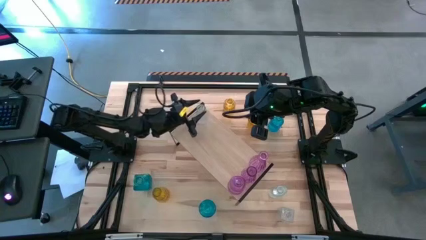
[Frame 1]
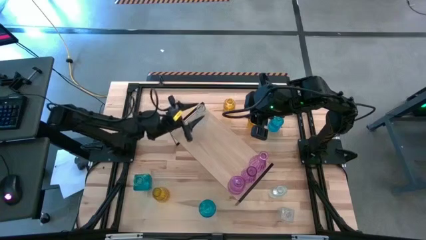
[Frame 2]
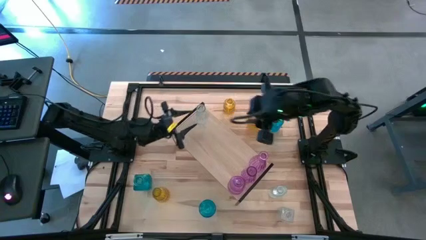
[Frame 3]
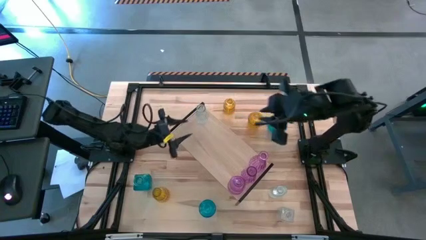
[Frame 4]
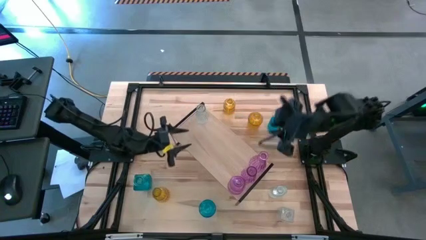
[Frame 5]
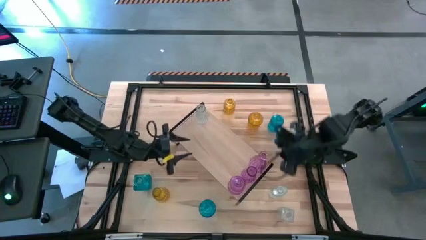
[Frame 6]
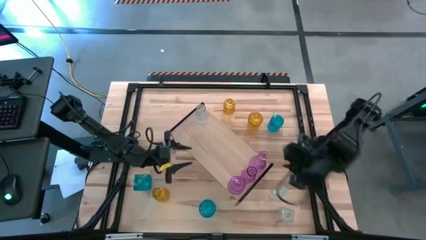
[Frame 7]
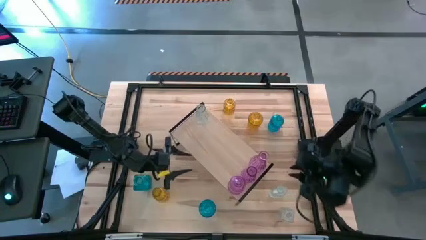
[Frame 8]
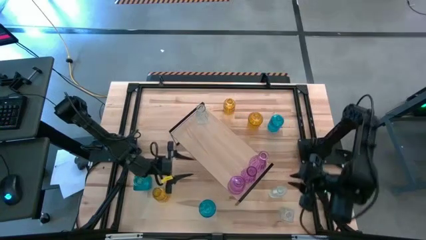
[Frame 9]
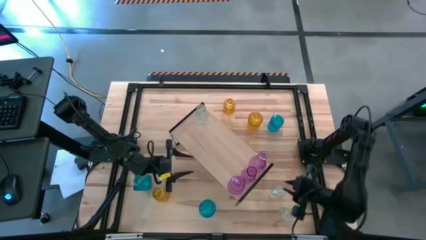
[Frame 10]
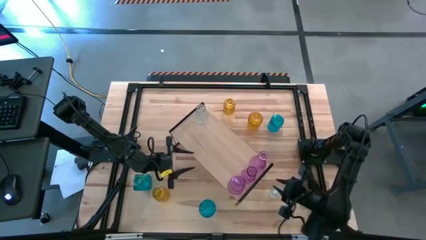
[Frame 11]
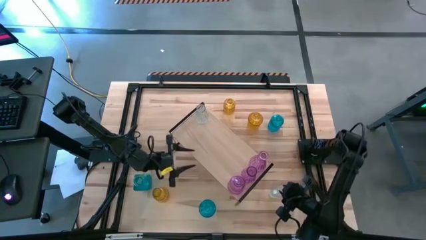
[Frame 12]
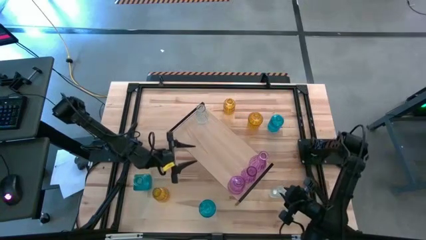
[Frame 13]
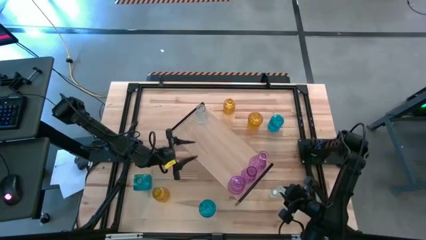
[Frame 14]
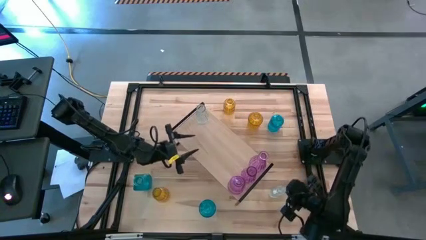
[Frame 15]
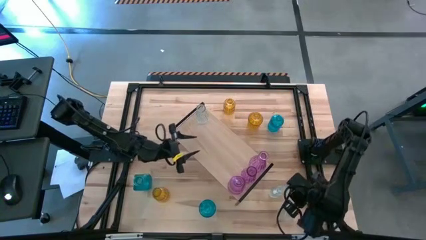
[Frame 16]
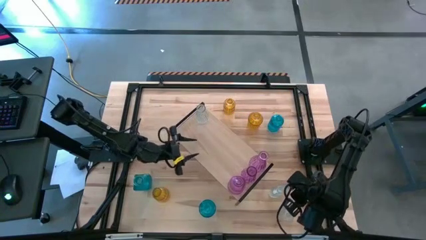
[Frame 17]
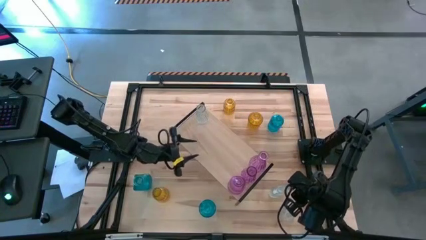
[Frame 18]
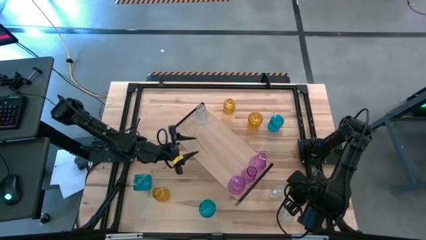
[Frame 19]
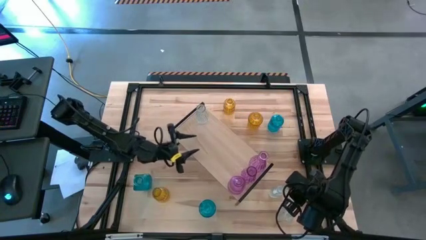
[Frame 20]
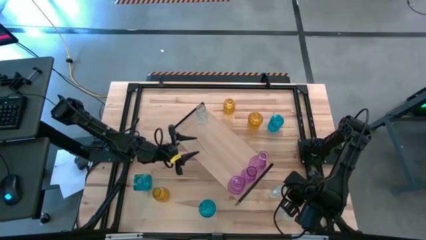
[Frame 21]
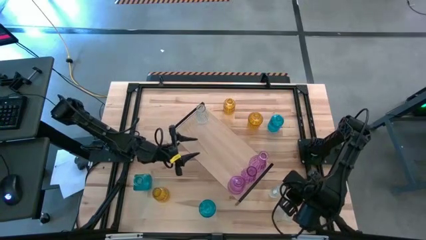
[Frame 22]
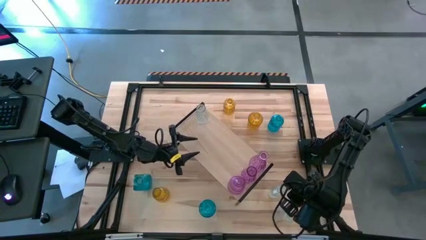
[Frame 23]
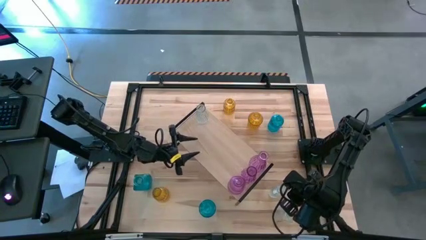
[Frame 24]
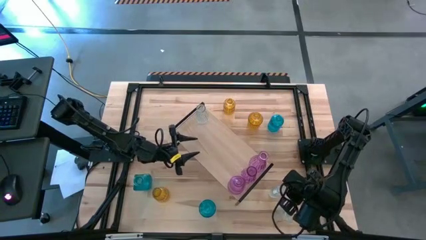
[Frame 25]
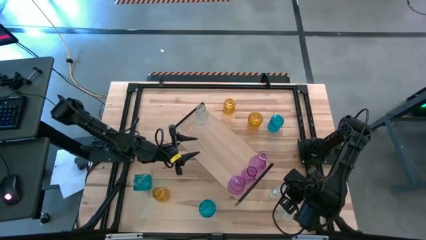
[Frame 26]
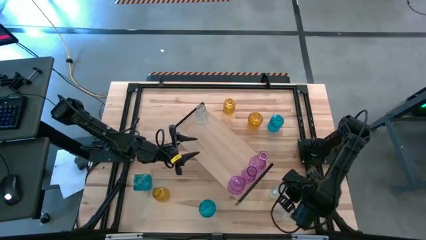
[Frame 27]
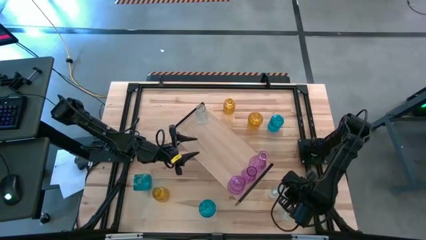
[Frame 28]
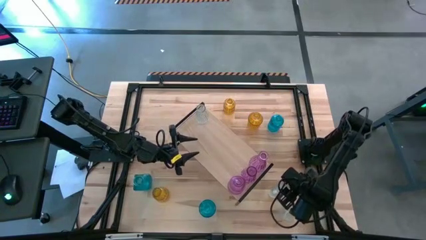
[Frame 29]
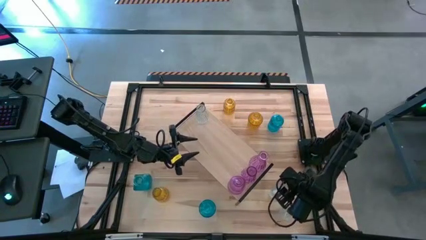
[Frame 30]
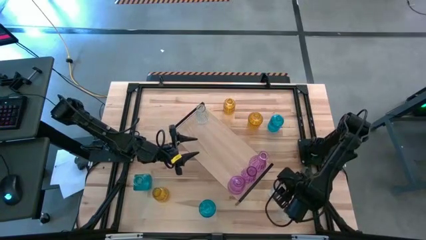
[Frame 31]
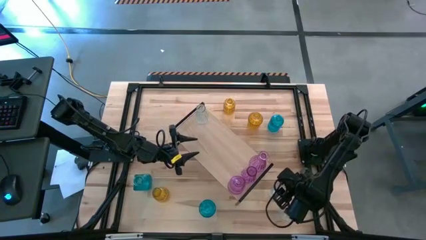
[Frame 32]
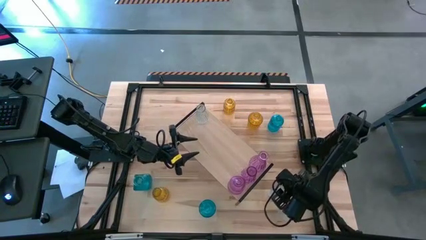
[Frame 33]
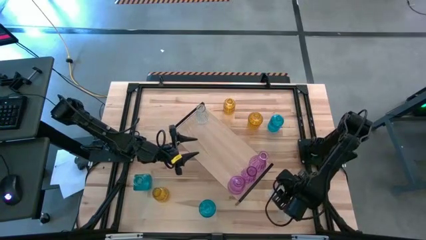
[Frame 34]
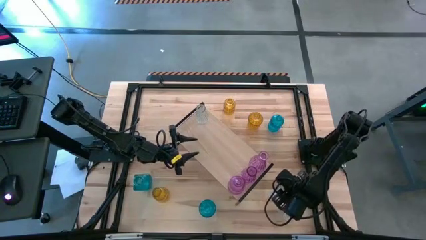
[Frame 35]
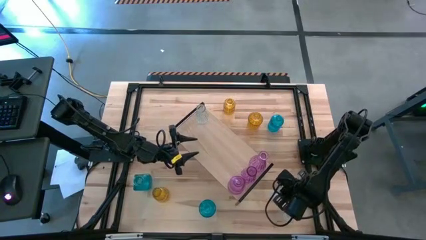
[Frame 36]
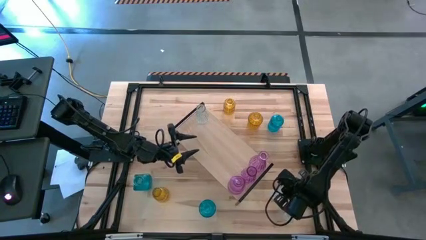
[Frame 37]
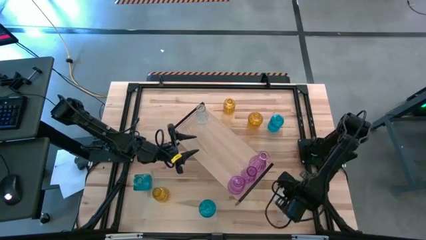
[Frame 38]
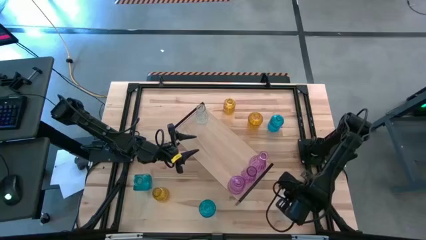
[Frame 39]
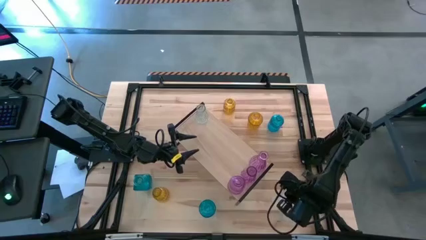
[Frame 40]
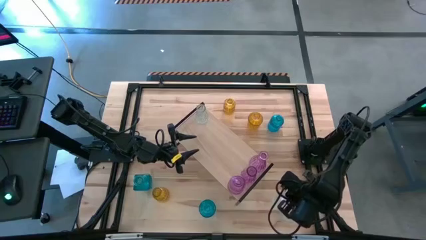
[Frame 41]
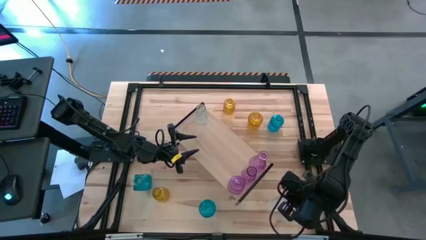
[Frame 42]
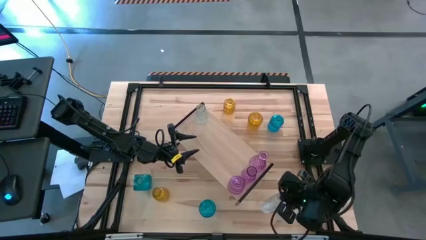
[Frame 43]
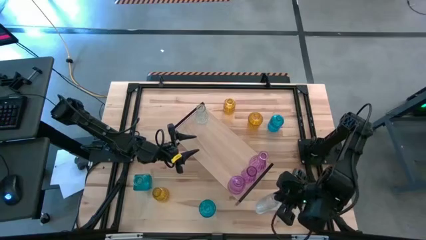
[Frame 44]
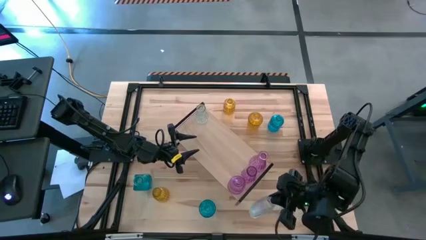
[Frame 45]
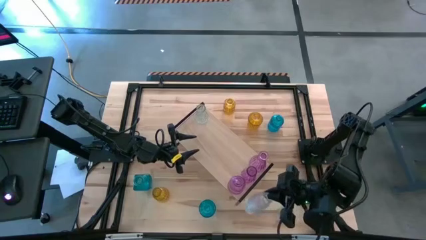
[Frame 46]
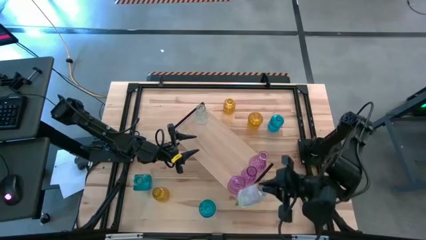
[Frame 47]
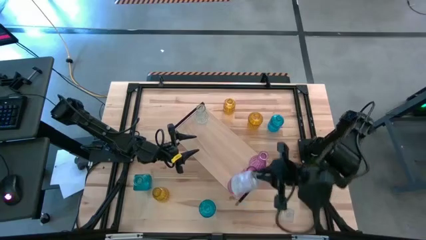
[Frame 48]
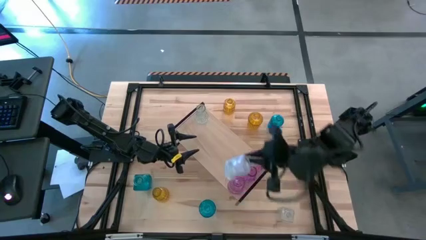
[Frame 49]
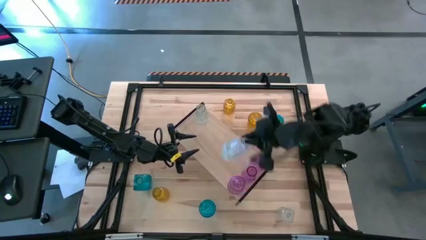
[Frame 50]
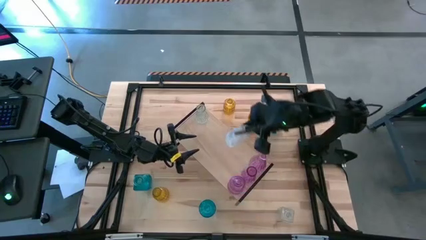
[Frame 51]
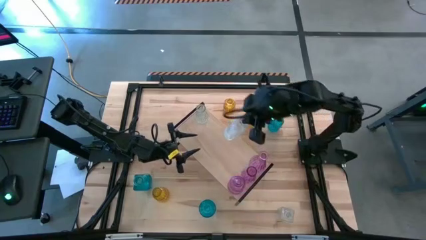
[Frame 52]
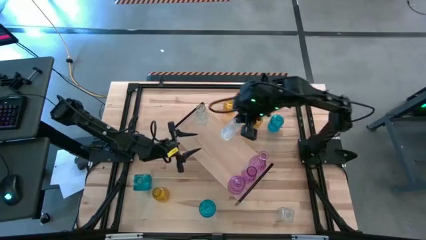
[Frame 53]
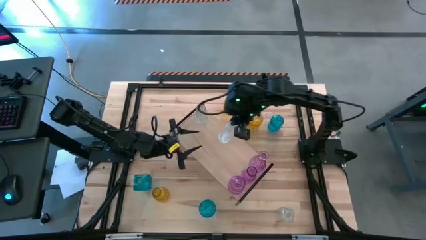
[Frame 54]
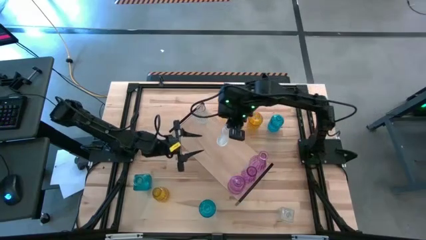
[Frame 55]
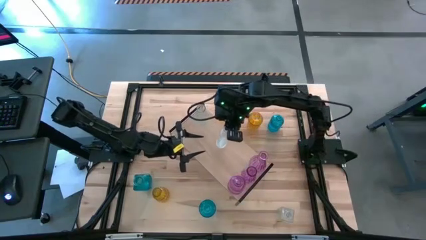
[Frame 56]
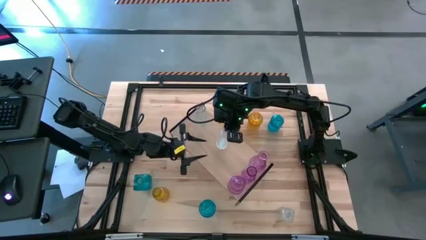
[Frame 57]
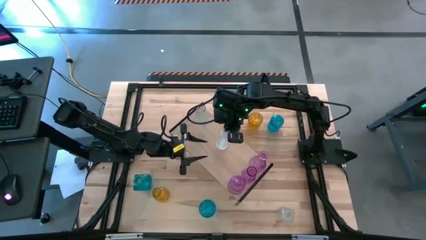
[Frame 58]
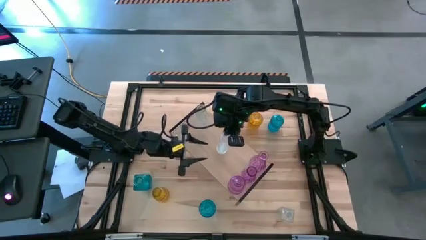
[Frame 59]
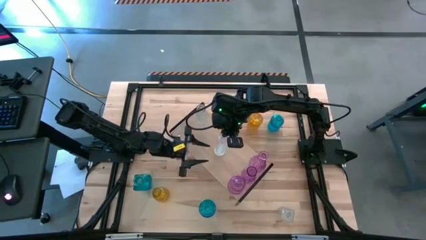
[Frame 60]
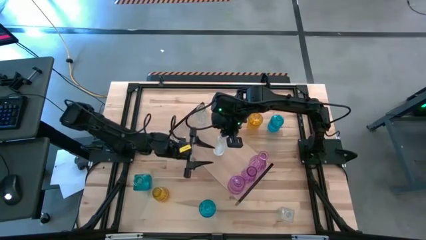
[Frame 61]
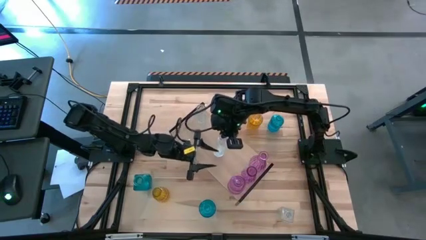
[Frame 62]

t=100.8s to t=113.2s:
Task: sort vases onto shelf
Put the top transparent flower vase on the shelf aligned with the other transparent flower vase

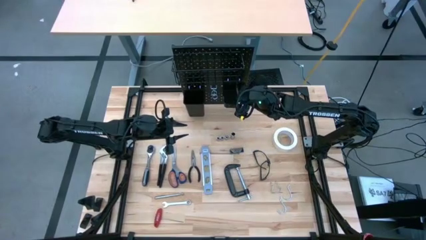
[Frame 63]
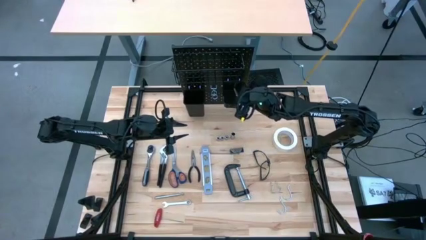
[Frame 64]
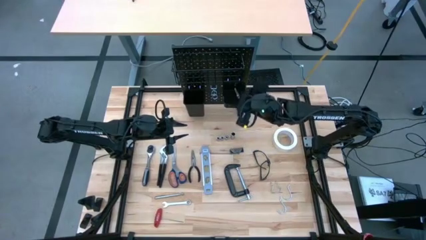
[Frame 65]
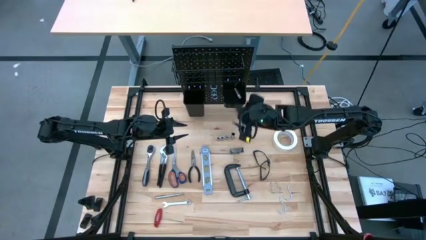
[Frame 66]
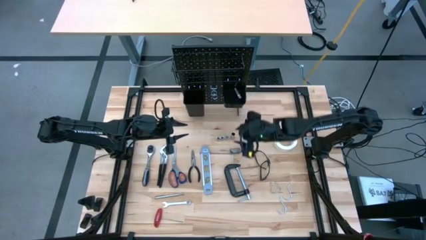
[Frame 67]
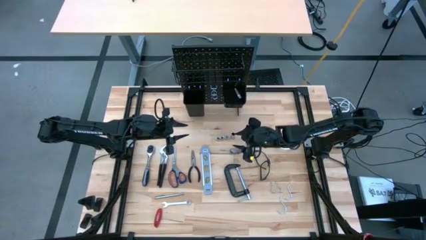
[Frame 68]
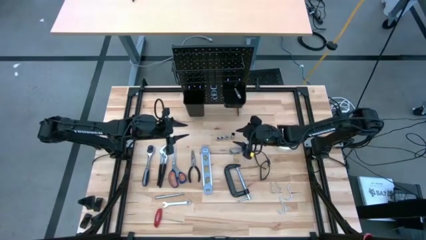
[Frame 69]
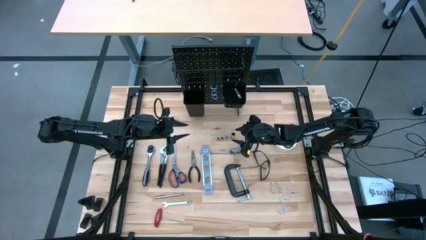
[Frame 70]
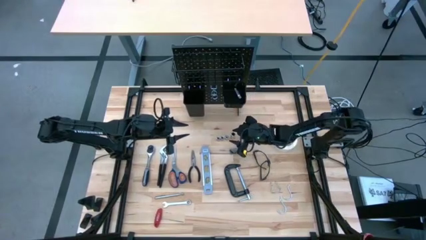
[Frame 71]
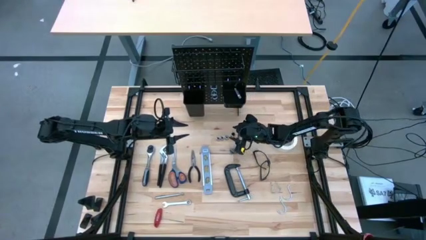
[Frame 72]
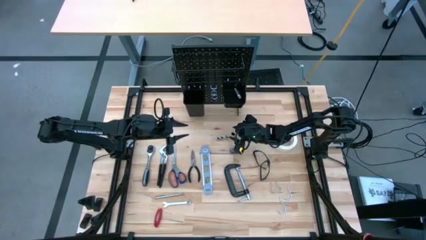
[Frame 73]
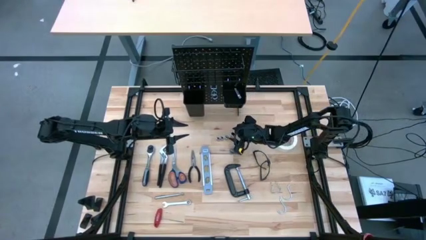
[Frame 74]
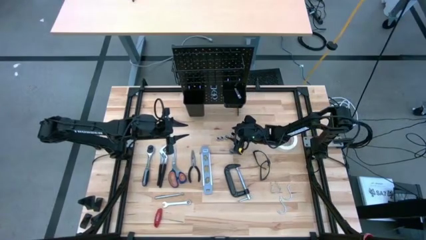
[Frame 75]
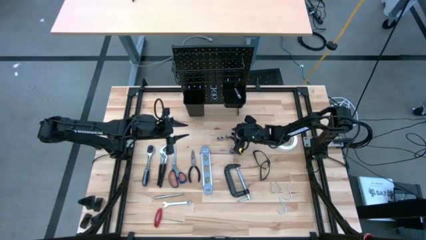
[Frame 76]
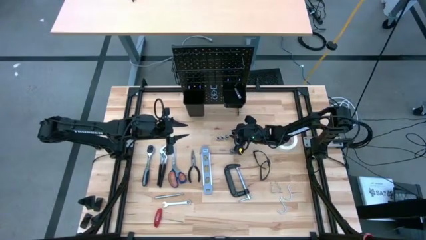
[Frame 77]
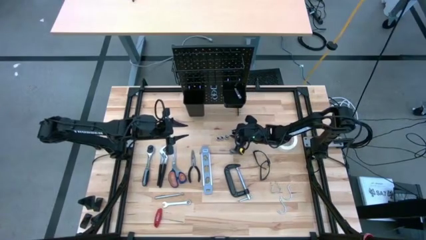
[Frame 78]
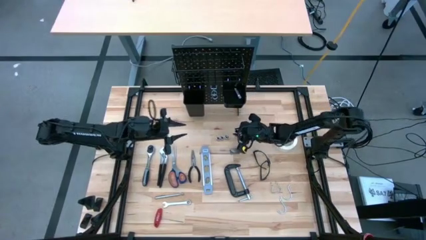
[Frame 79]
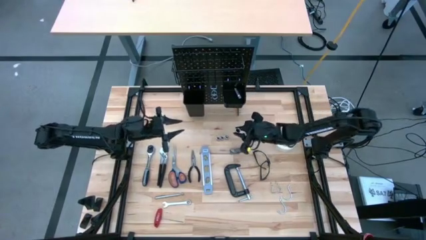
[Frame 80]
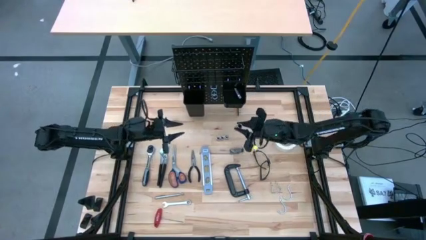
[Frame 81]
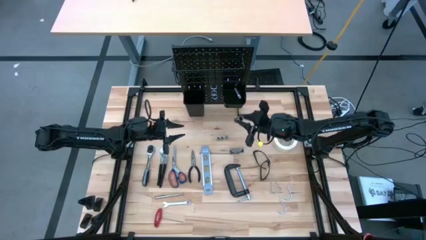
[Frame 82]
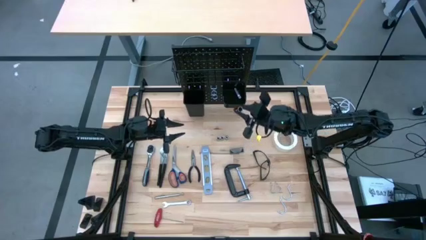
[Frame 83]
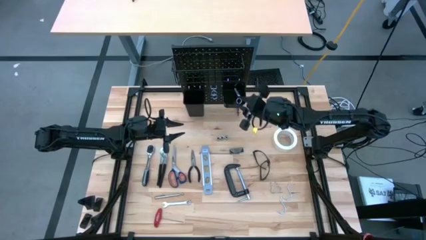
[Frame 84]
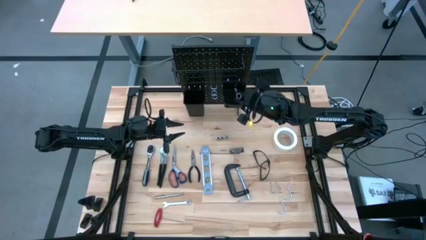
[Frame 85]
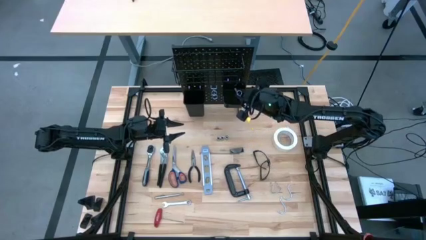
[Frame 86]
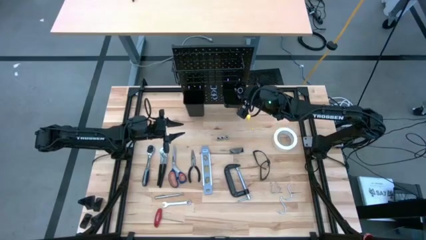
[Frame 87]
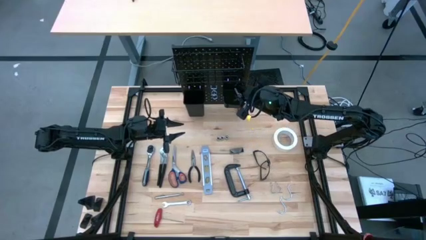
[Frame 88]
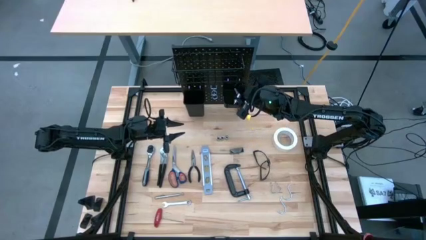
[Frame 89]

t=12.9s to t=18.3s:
Task: Hang tools onto peg board
Put the large socket into the right black bin on the peg board
